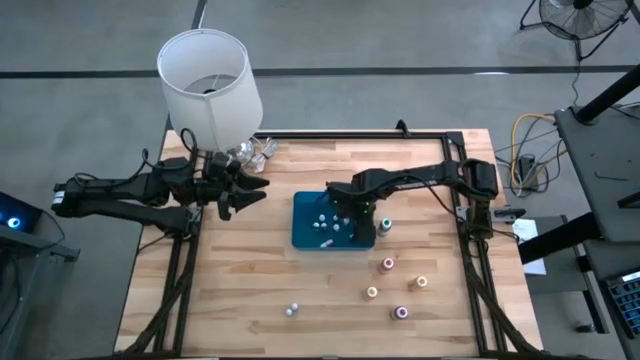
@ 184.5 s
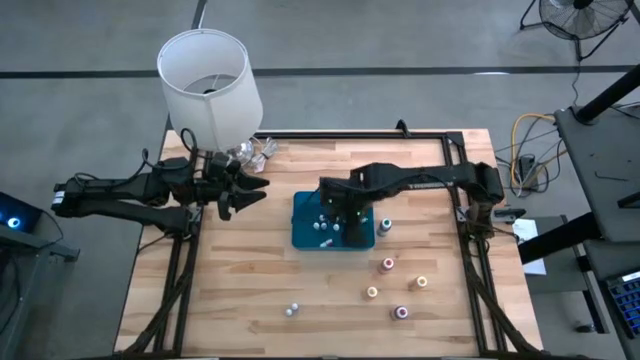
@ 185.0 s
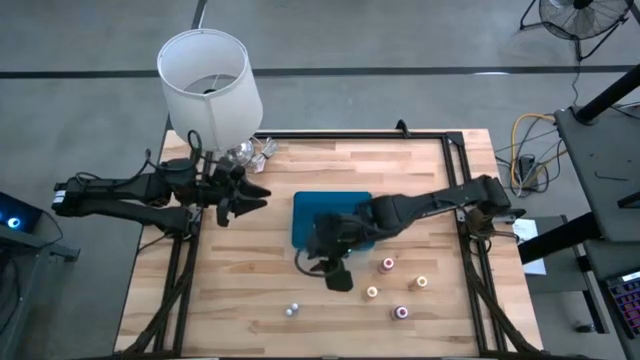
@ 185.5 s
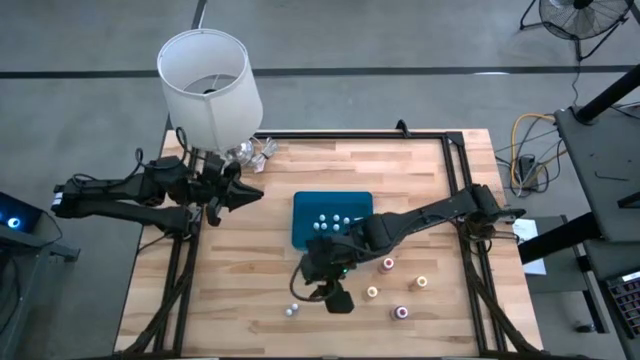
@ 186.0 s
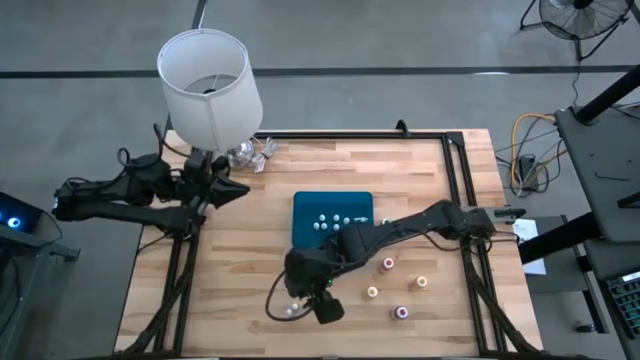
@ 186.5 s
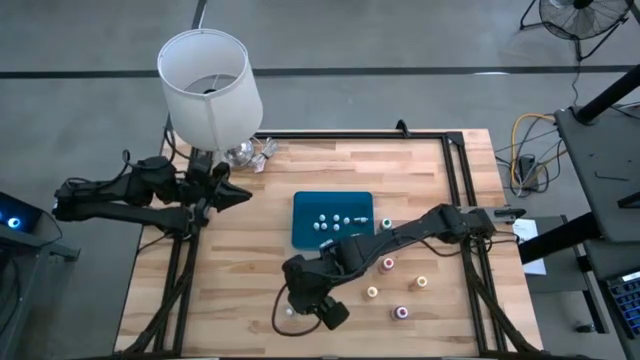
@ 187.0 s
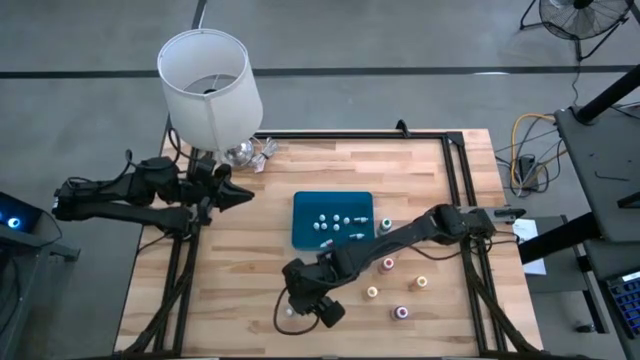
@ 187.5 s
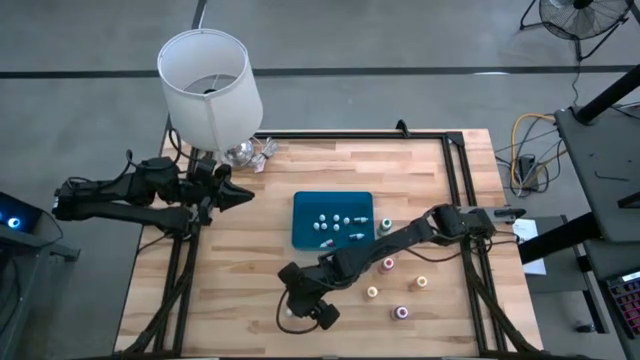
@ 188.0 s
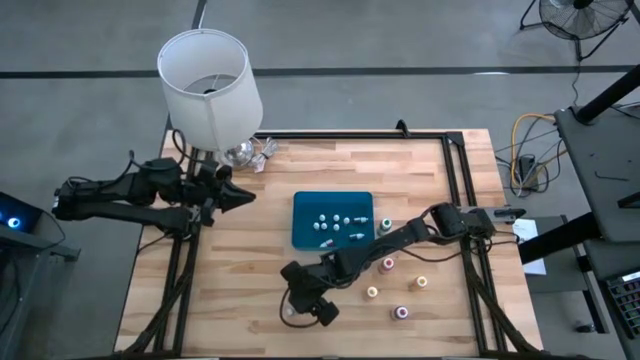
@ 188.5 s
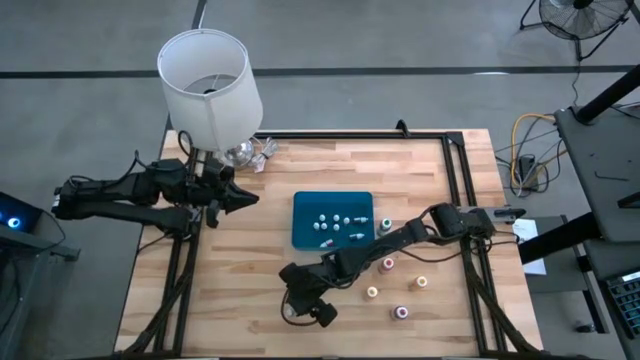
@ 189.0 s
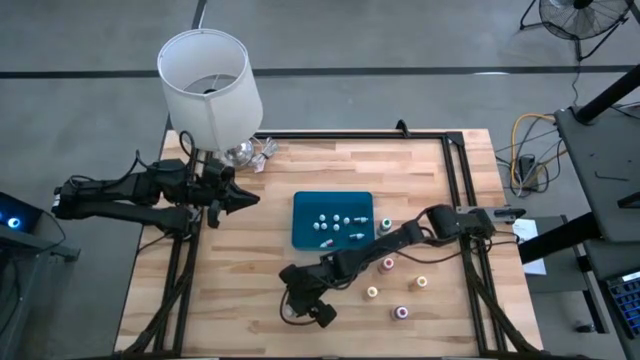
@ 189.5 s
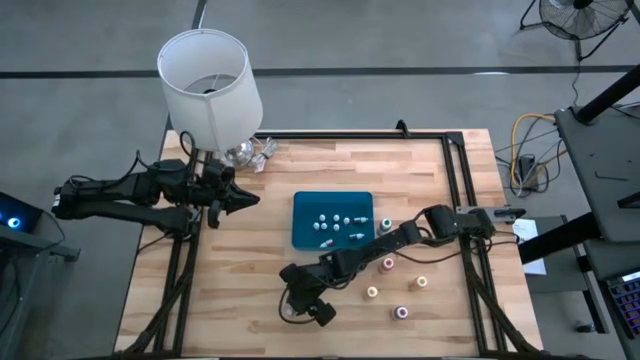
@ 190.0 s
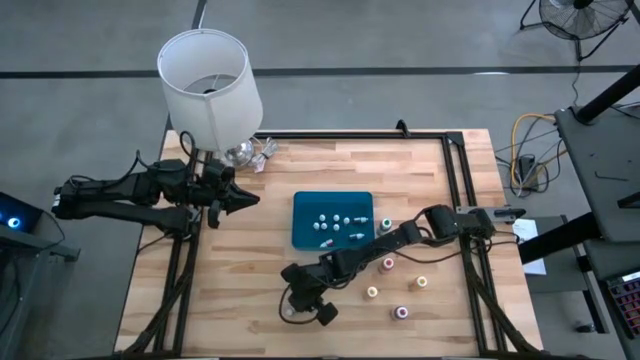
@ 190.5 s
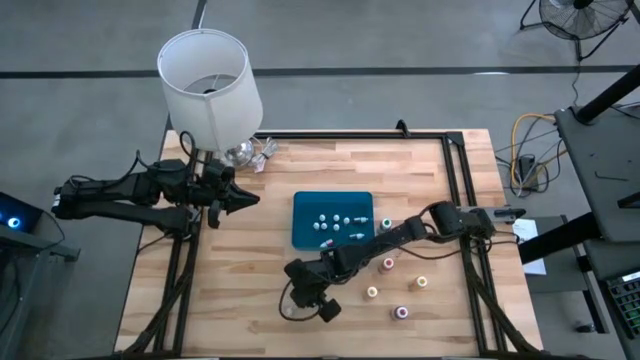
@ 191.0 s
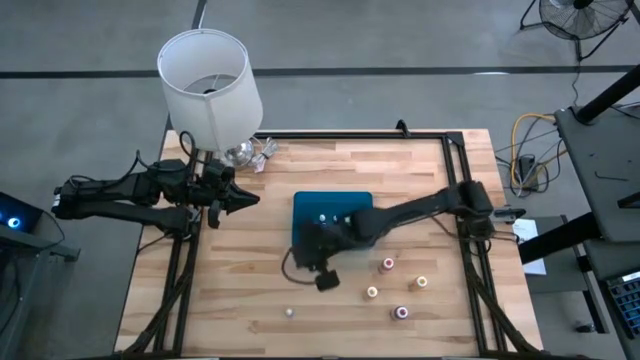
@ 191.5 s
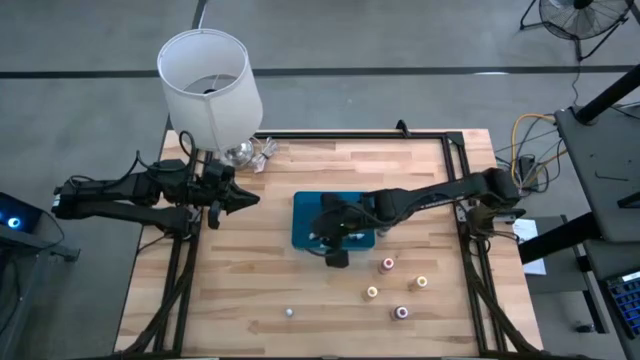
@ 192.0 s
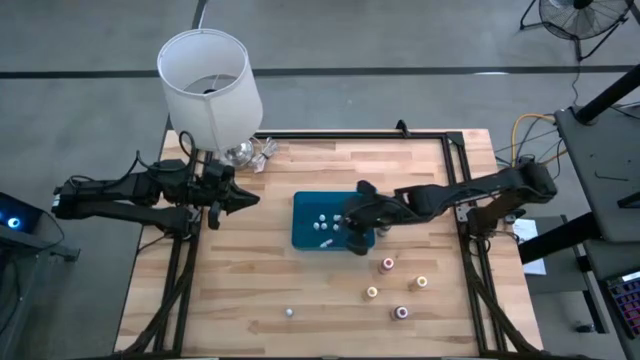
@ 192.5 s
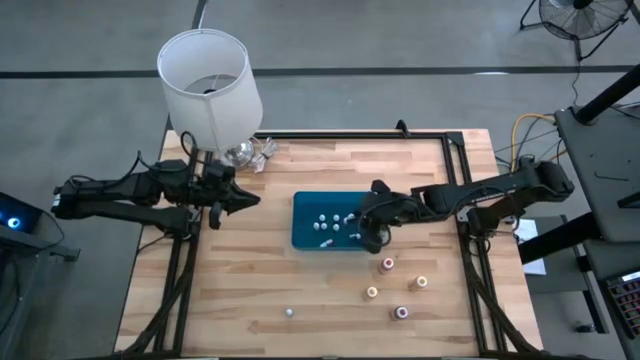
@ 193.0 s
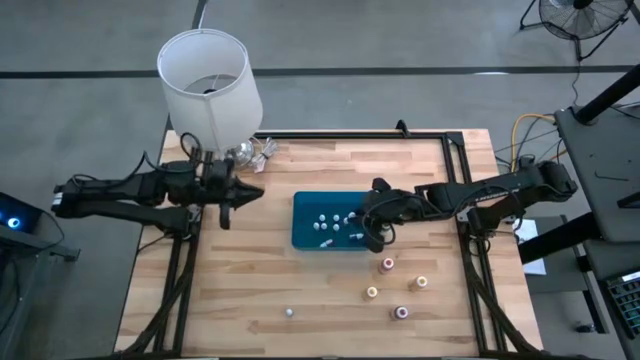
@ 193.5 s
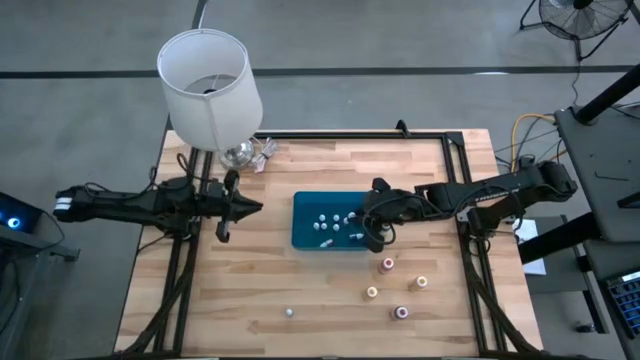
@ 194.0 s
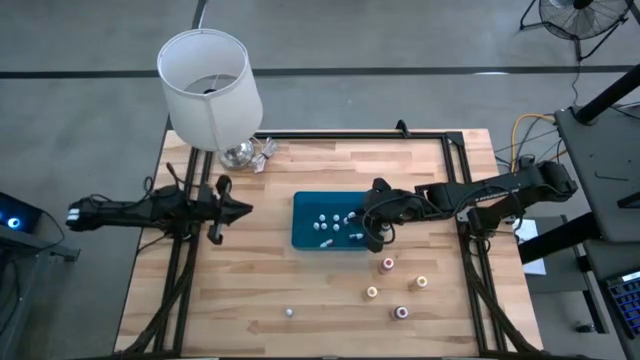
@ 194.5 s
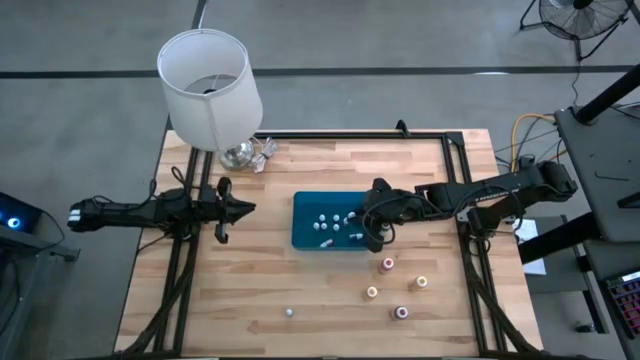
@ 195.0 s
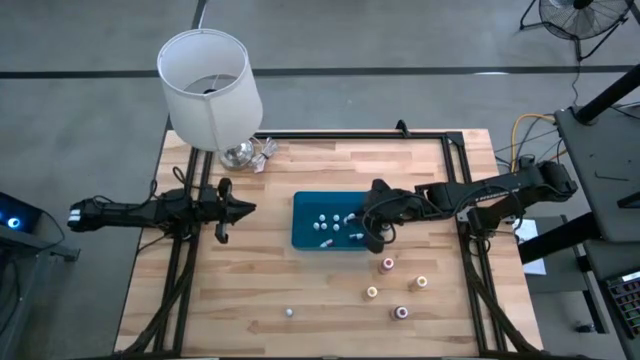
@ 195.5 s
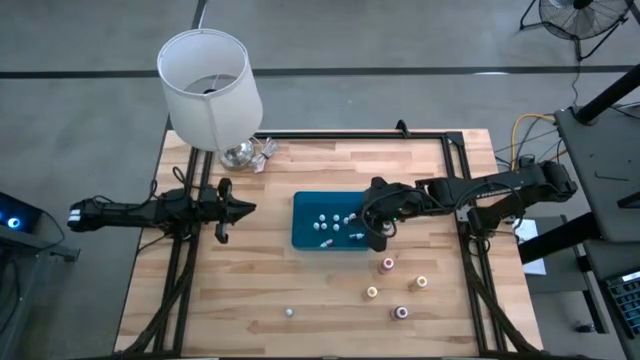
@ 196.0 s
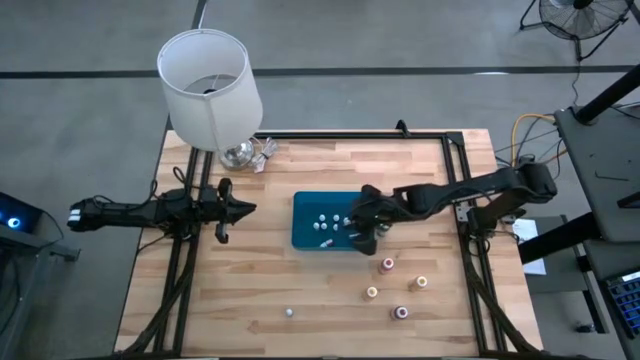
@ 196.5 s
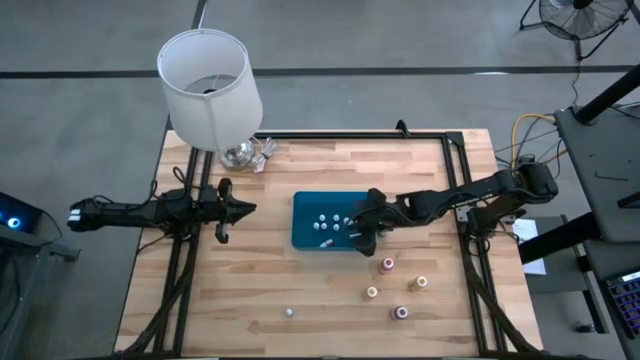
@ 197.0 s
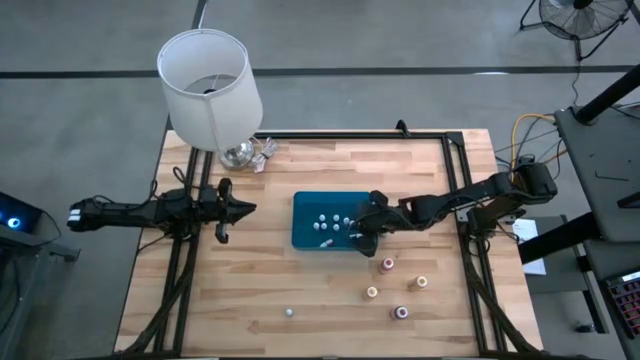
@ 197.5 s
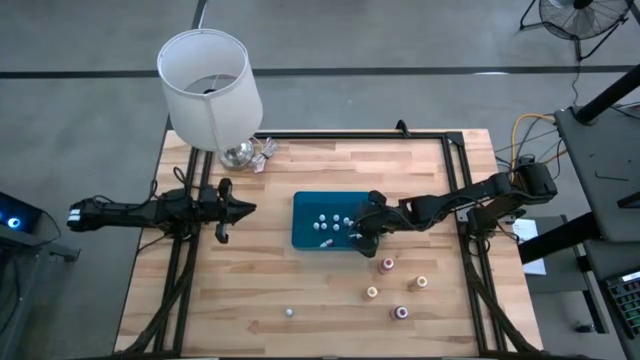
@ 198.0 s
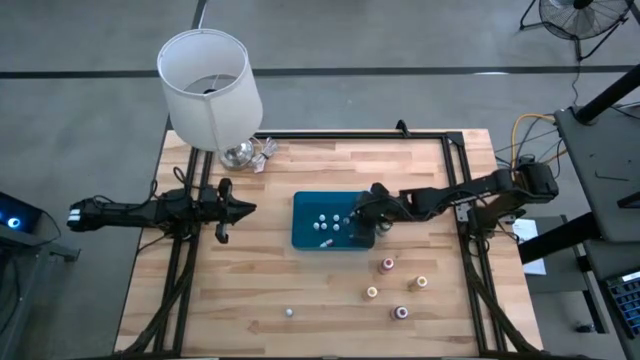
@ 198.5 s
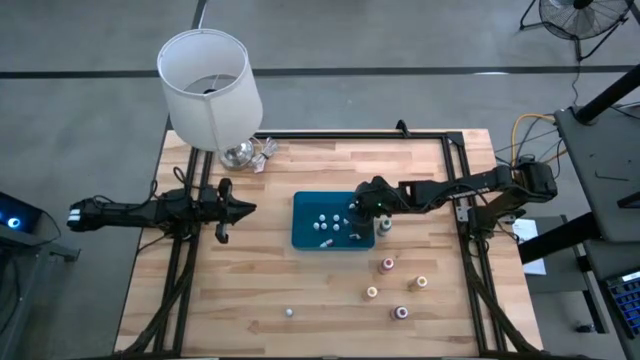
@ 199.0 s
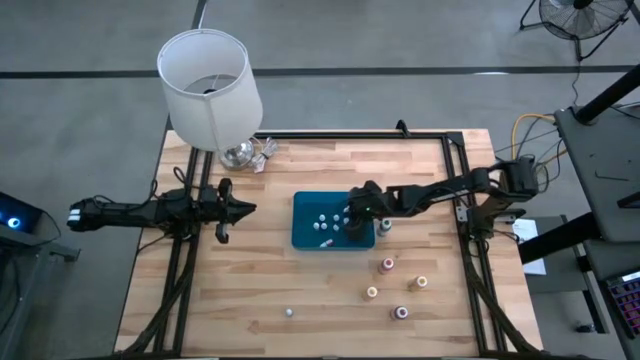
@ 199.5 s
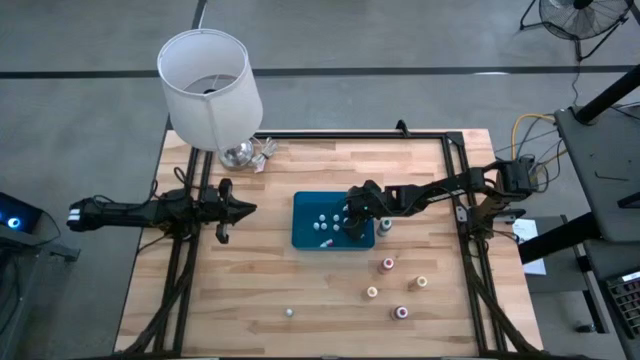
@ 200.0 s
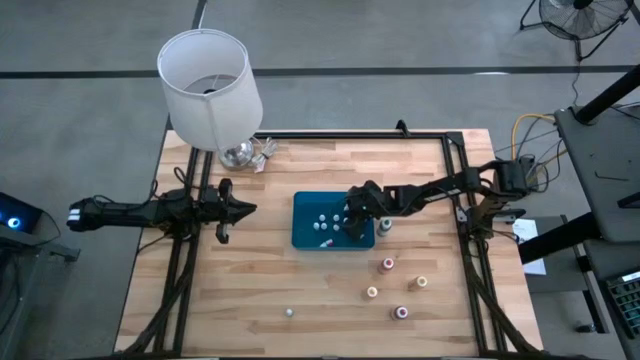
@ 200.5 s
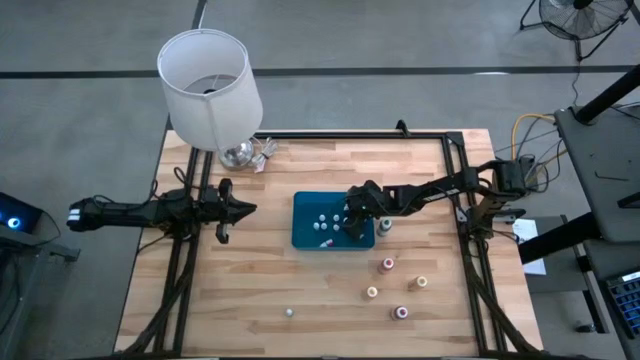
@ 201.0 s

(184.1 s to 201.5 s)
Task: Pick & Place food coloring
Put the small black food coloring bottle into the blue bin

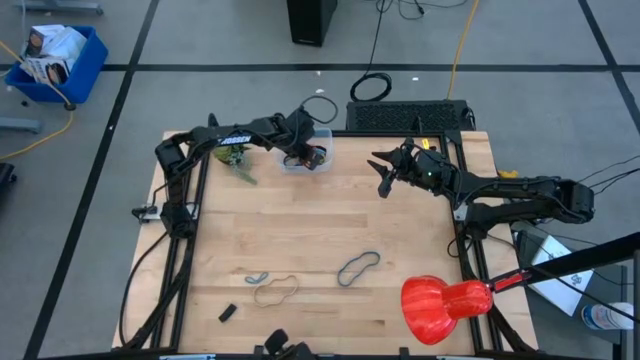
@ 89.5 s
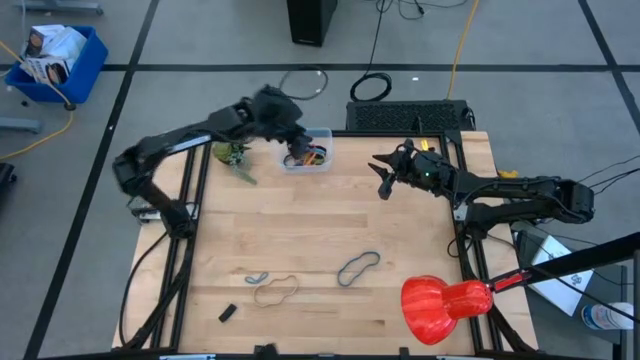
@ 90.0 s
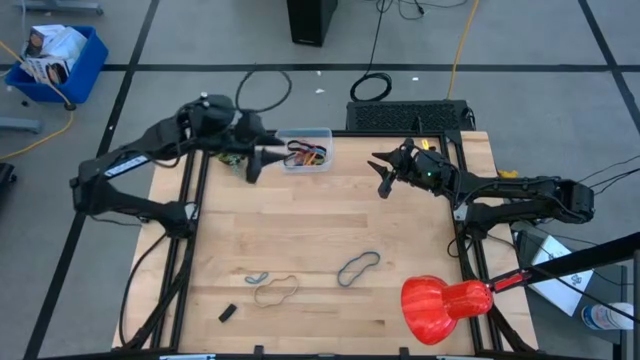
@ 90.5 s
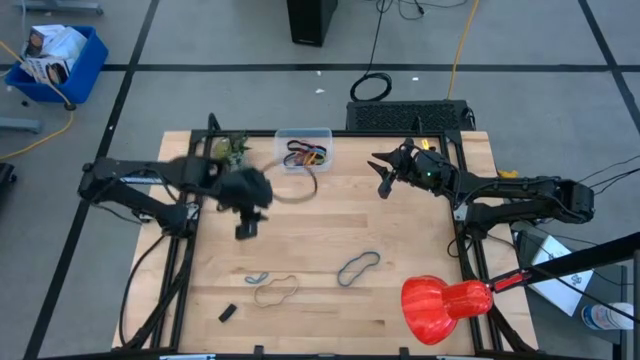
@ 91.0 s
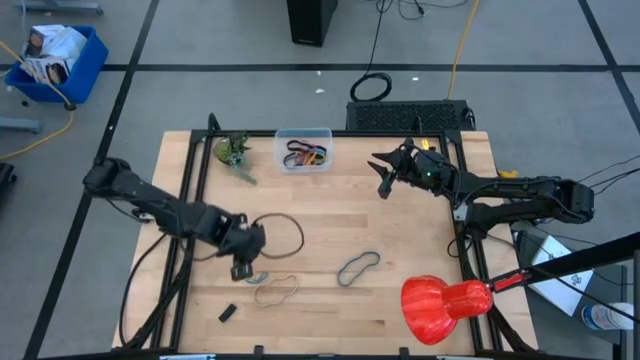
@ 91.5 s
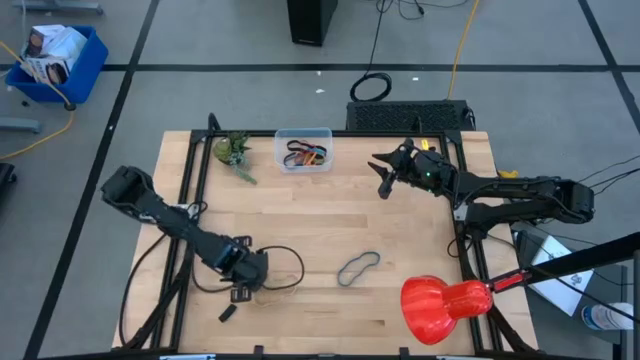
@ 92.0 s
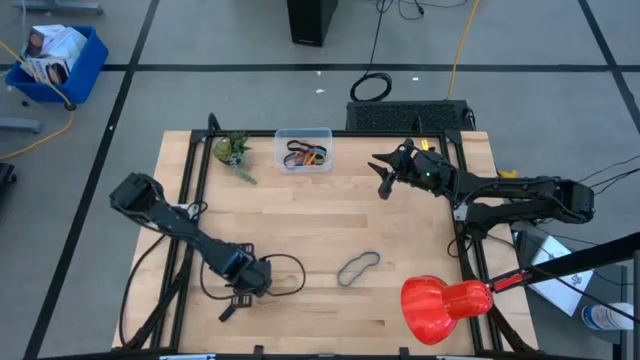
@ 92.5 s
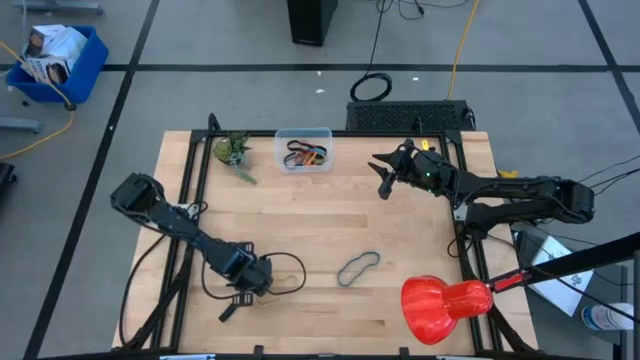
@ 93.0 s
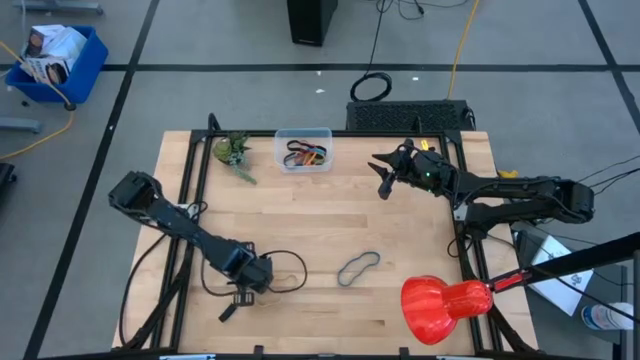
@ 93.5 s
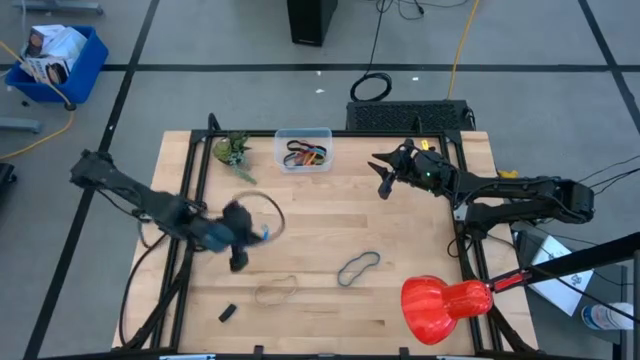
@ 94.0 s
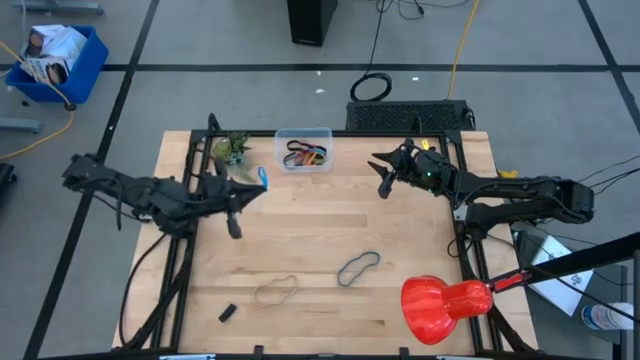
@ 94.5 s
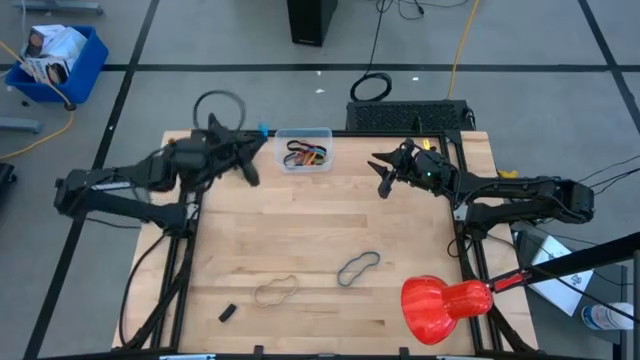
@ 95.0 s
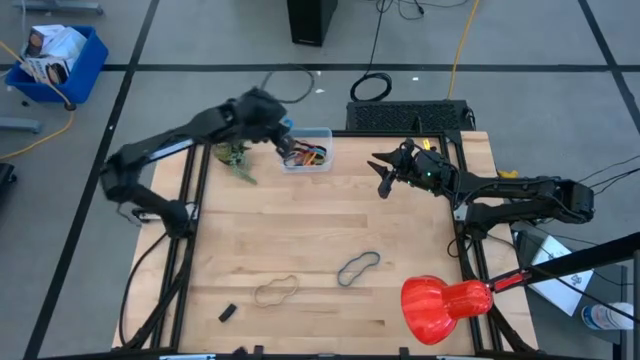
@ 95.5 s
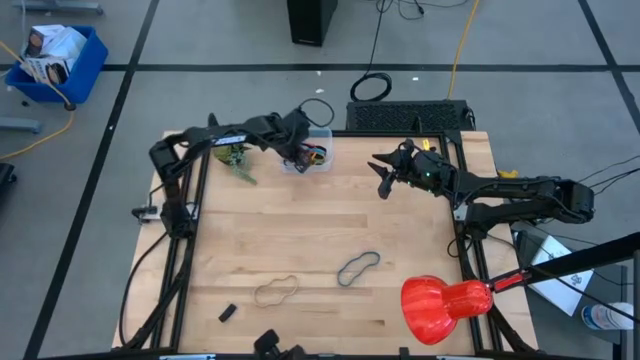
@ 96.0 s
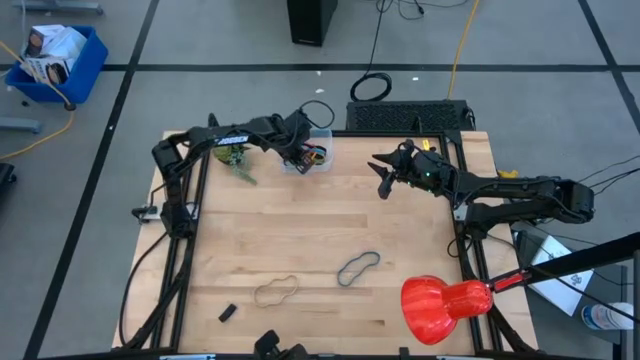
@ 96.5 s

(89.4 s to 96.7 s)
Task: Pick and place rubber bands into bin
Put the blue rubber band into the transparent bin
